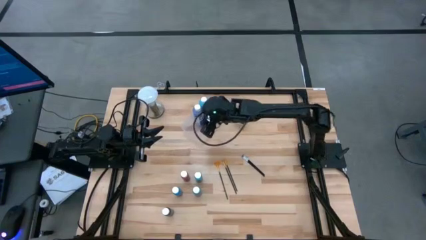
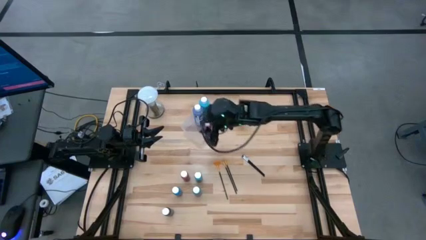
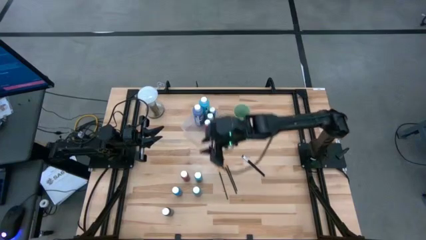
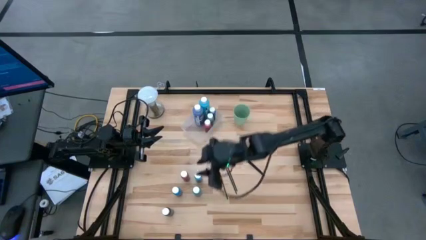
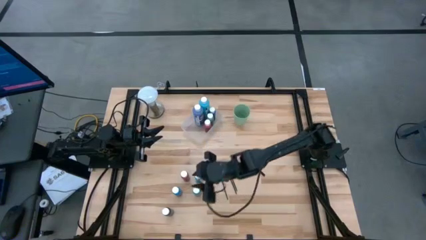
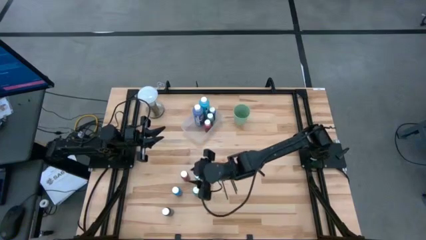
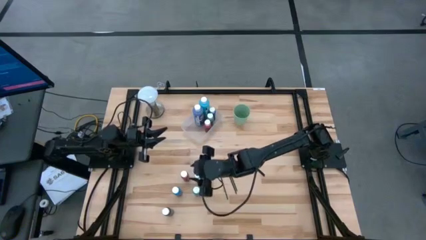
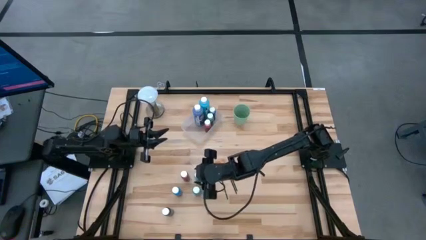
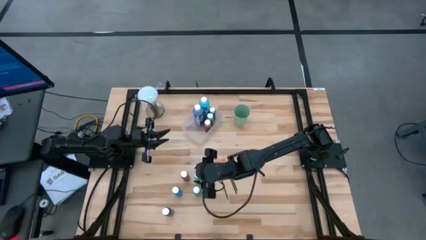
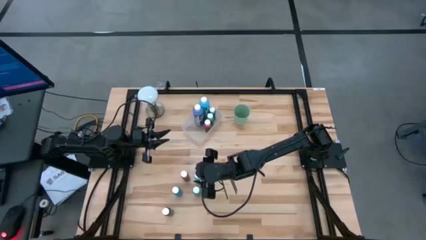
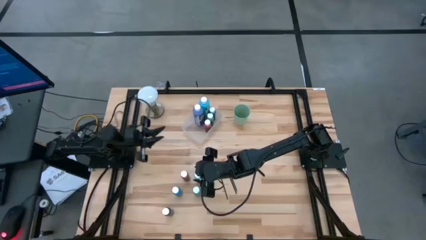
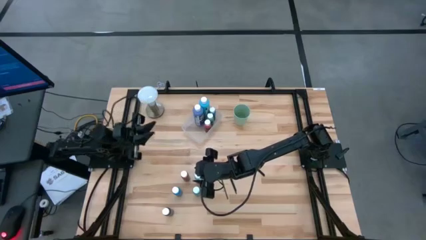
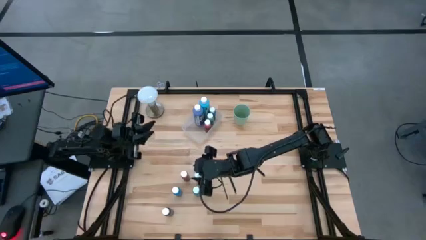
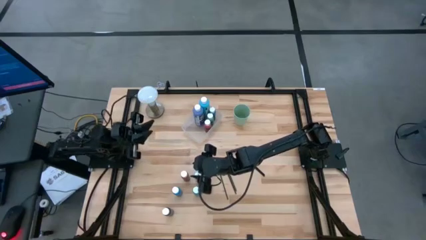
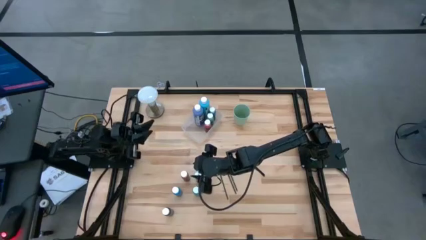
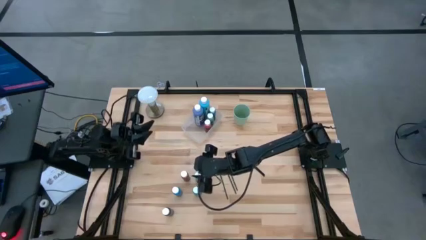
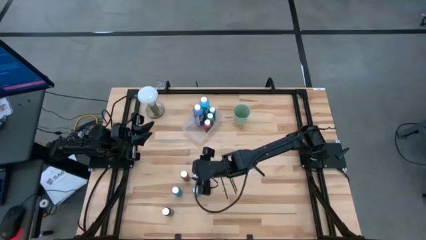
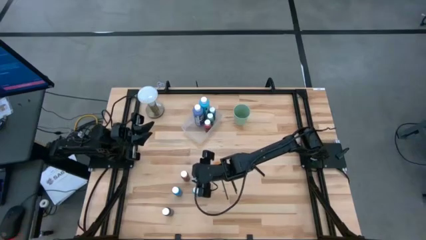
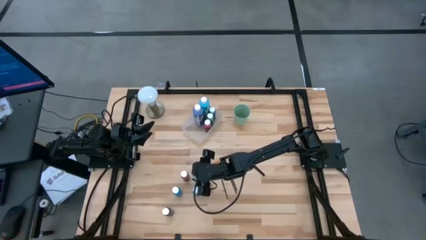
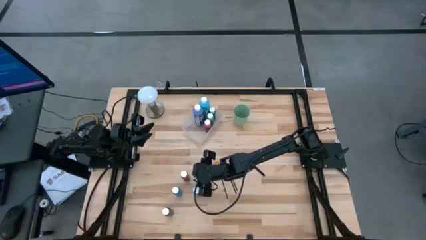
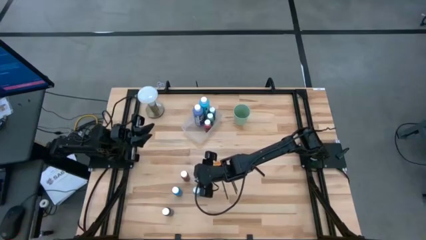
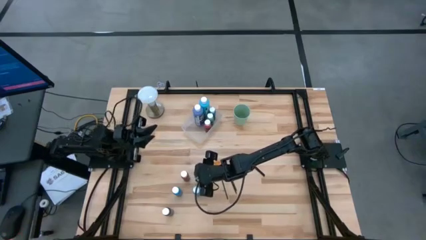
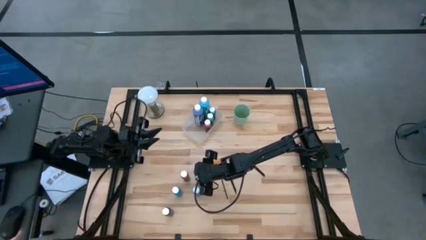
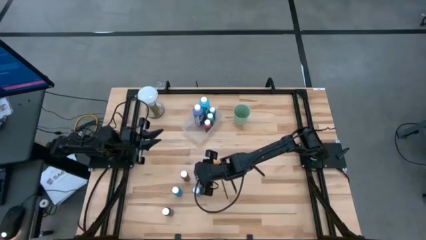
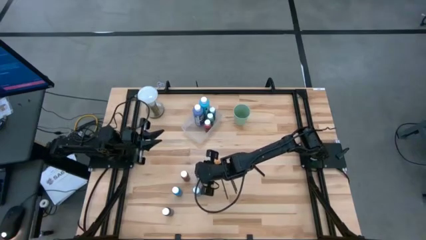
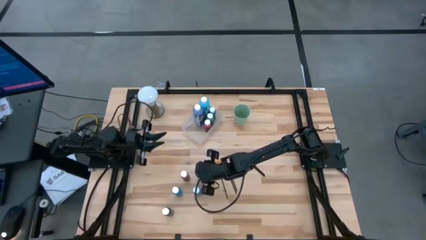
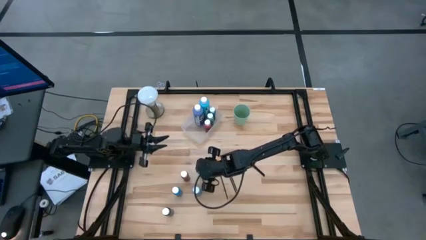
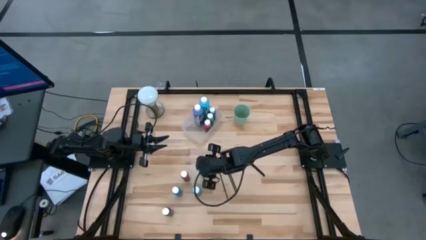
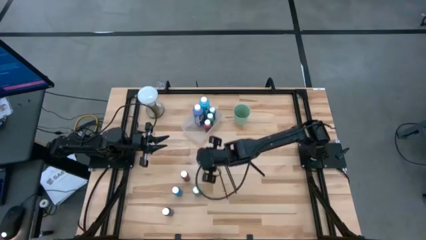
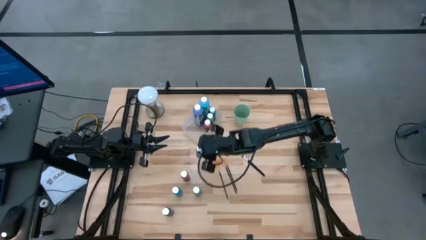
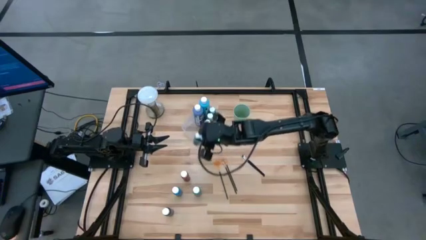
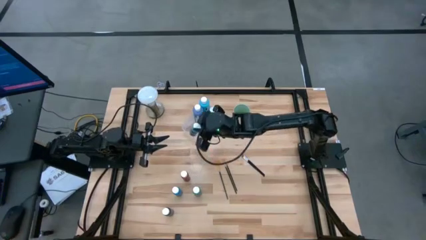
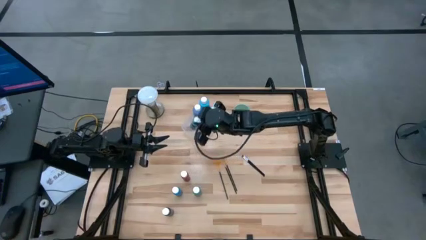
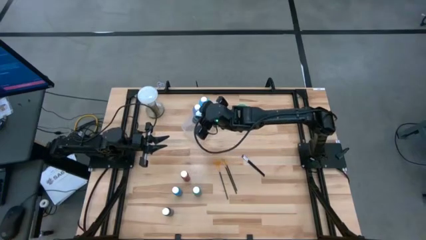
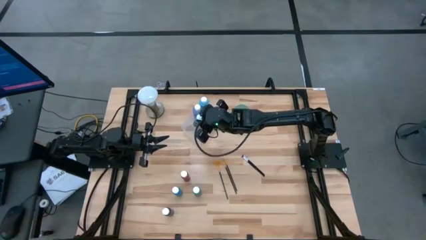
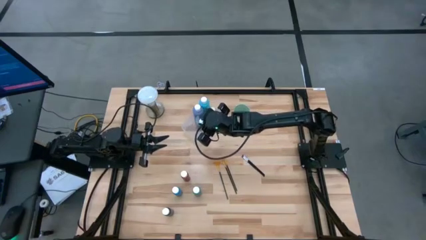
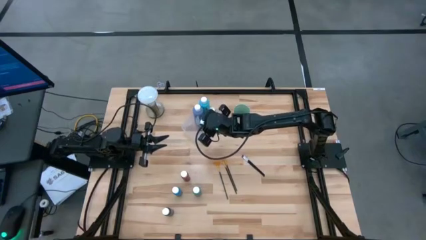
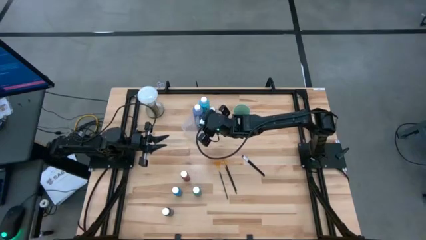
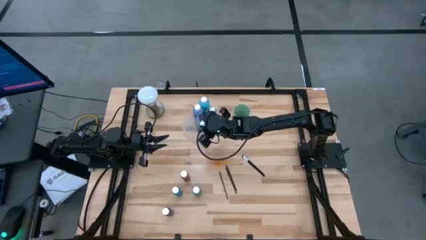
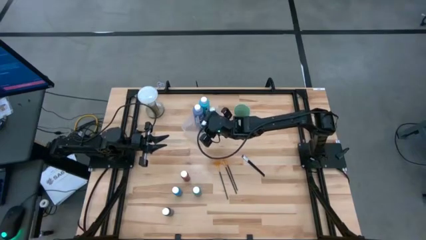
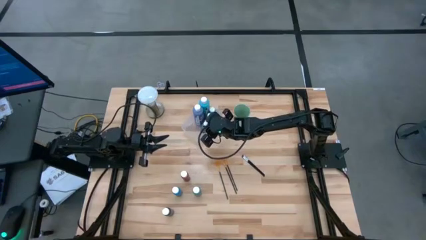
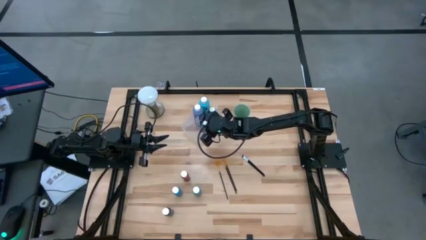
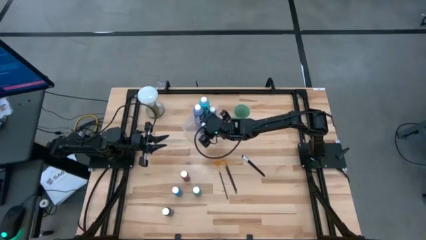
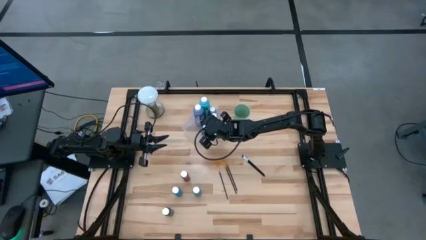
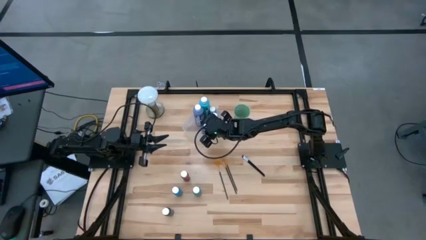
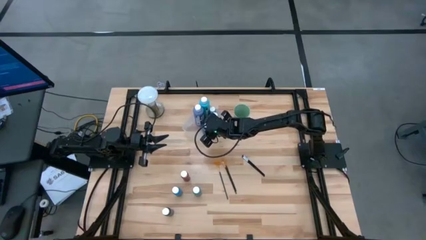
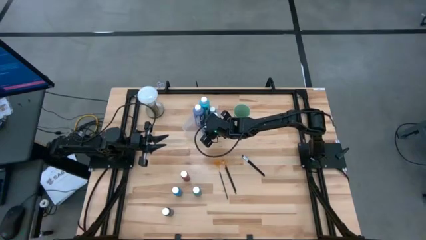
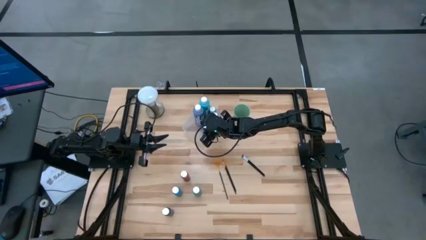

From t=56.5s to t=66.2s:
Task: Pick & Place Paint Supplies
Put the small light blue paint bottle into the transparent bin

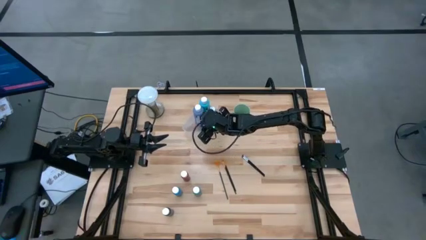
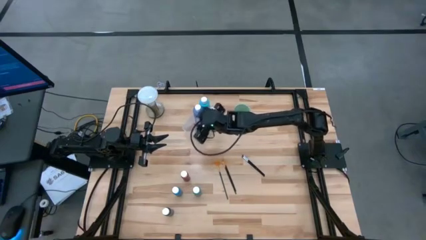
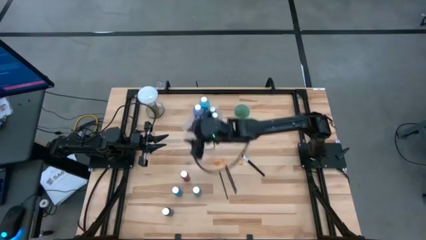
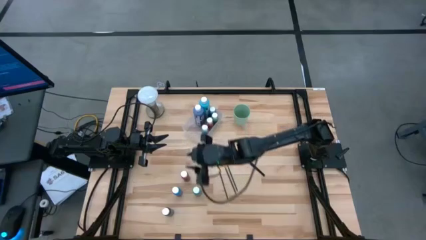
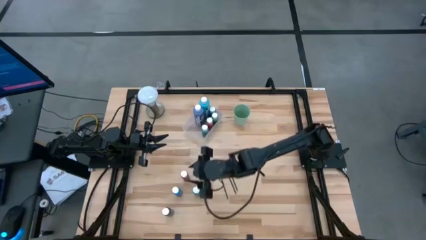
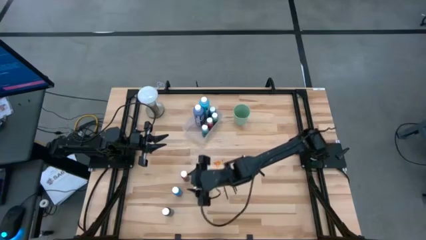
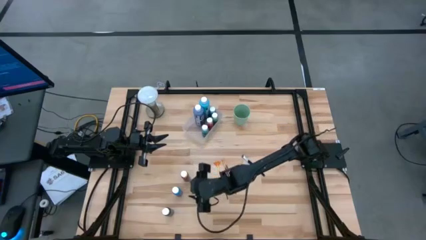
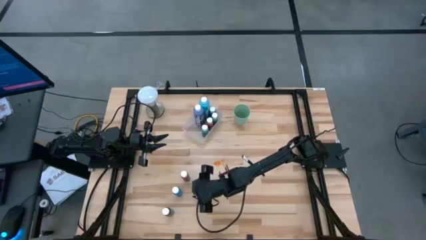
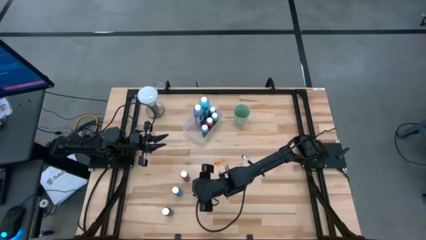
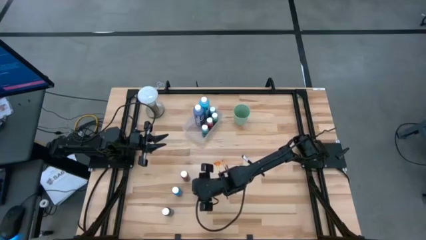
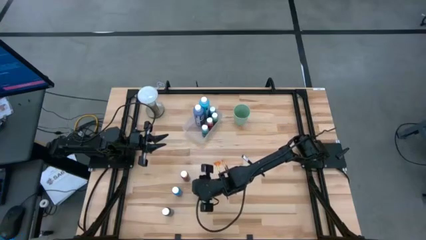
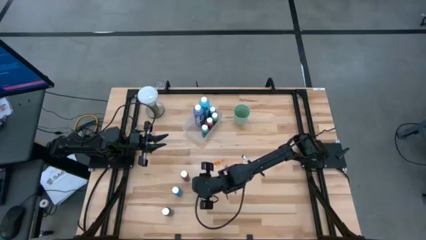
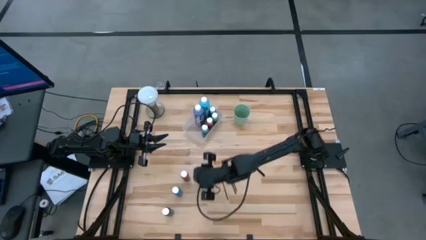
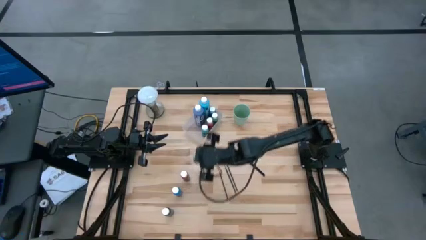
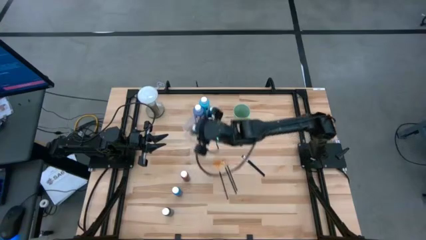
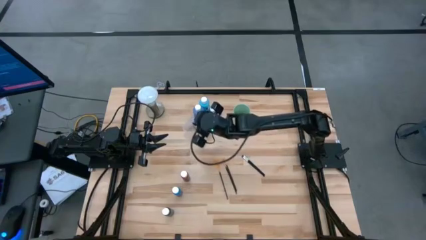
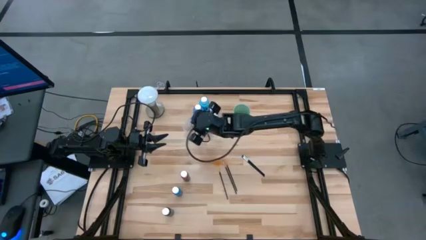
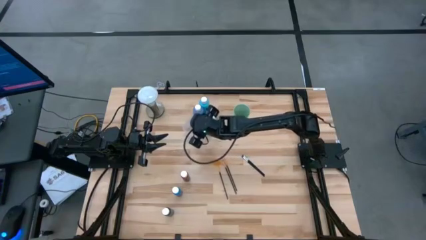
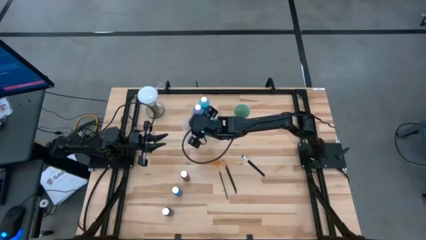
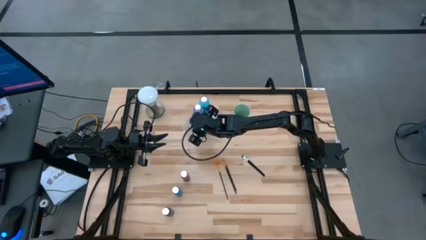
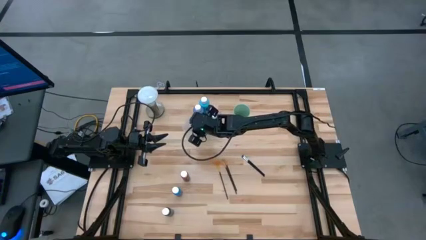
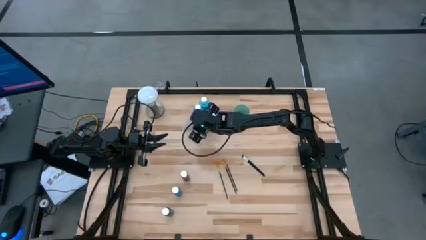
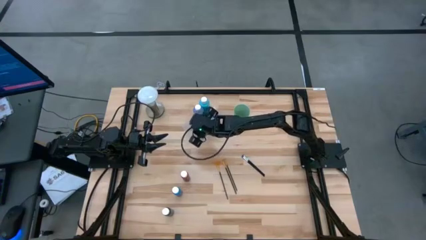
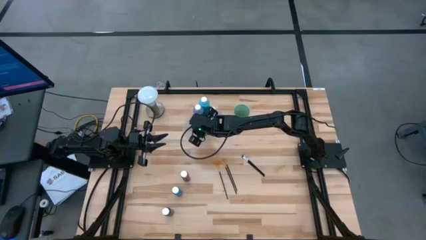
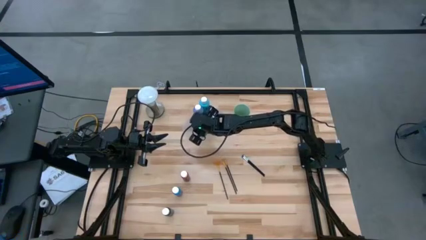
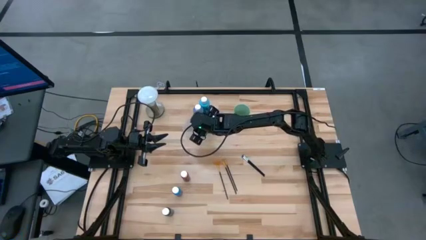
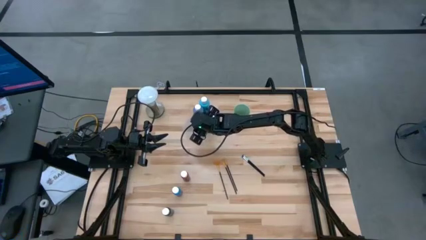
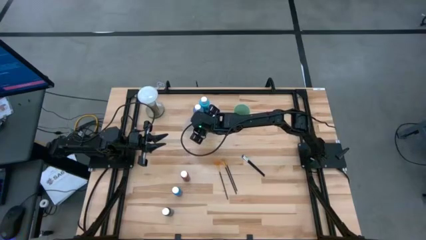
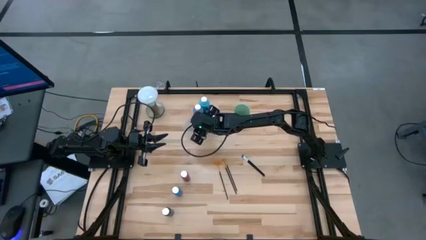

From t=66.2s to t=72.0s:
Put the small green paint bottle into the transparent bin

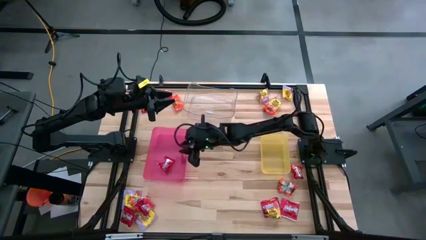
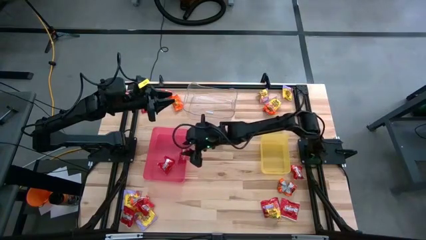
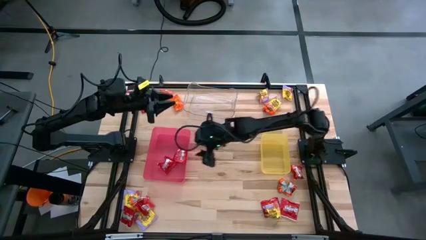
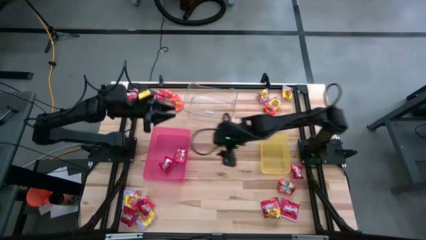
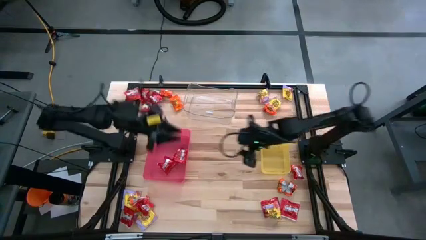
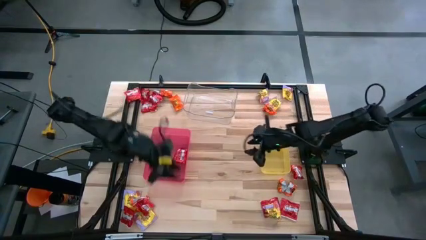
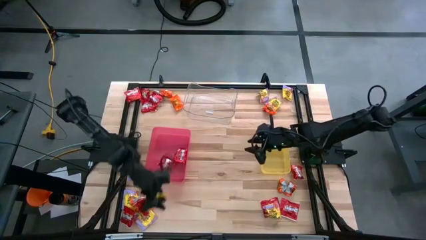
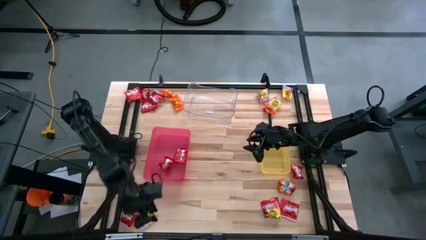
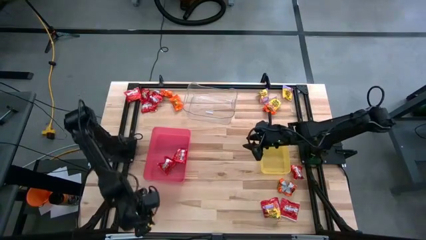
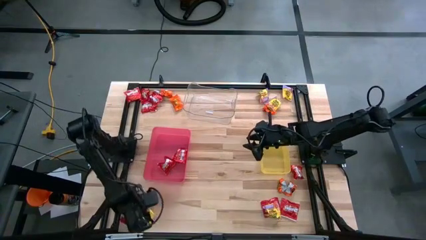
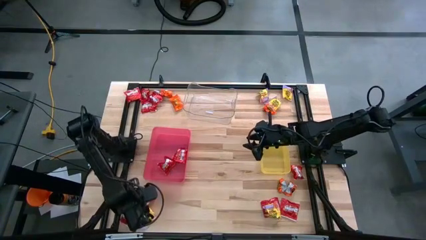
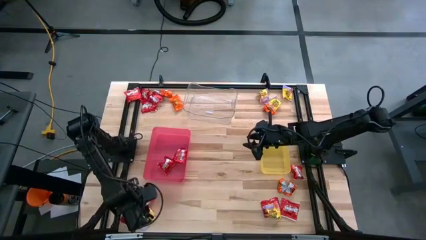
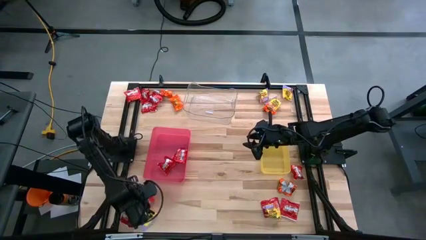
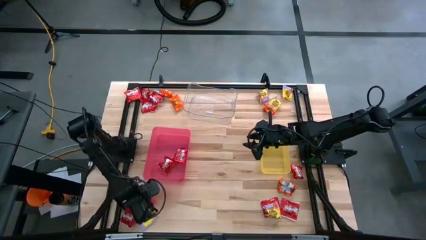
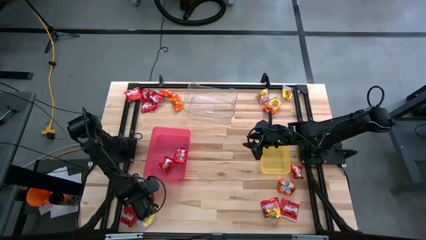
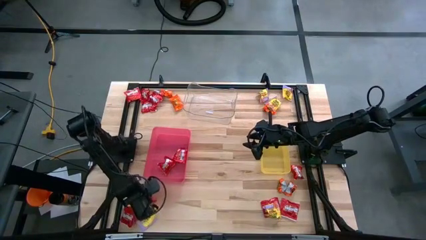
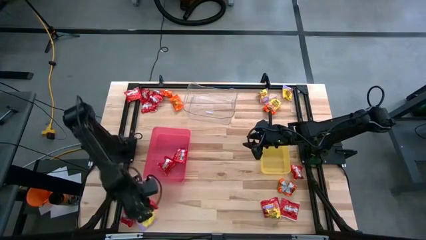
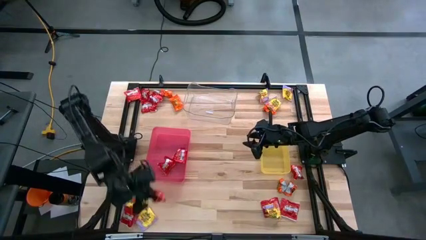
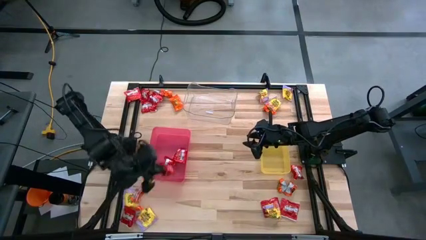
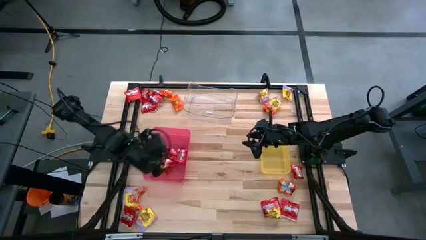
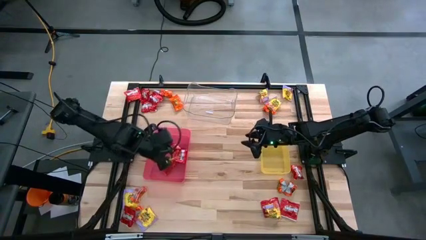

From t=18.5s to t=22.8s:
Task: Sort candy
Put the red candy into the red bin
